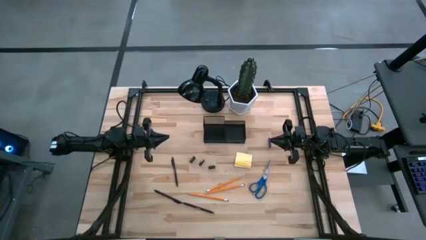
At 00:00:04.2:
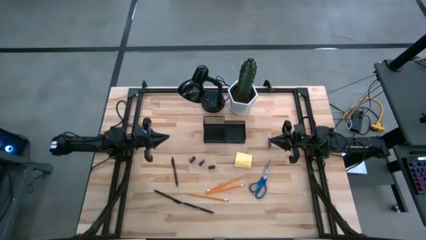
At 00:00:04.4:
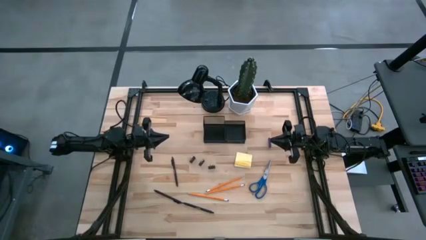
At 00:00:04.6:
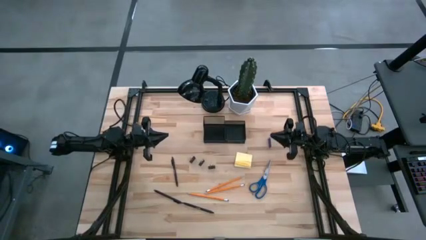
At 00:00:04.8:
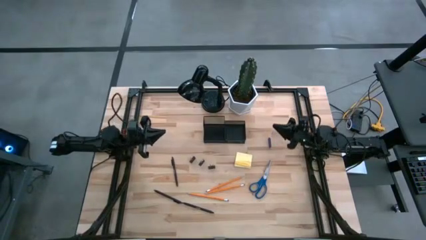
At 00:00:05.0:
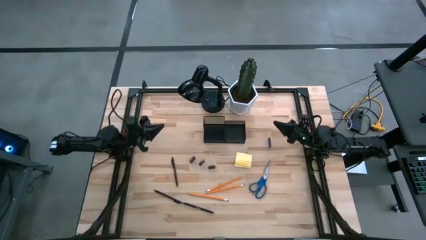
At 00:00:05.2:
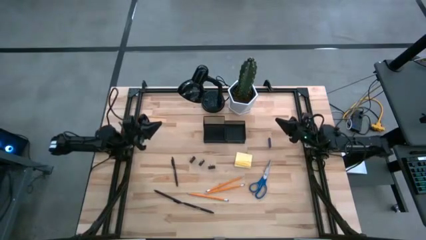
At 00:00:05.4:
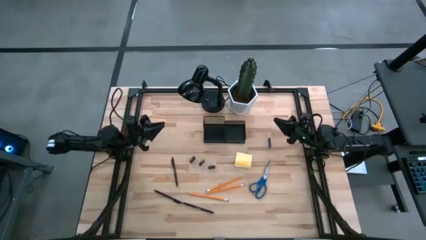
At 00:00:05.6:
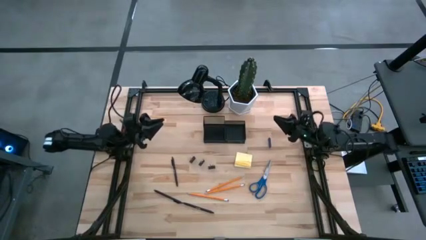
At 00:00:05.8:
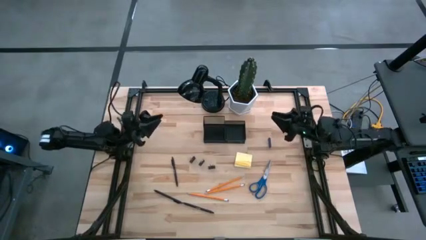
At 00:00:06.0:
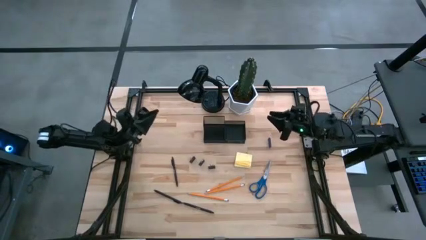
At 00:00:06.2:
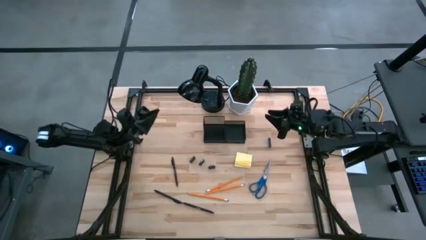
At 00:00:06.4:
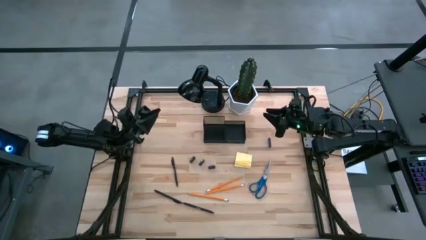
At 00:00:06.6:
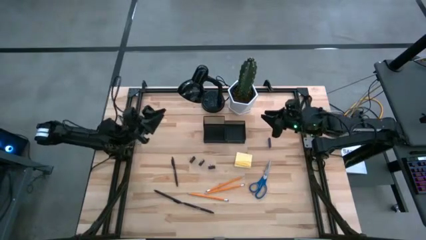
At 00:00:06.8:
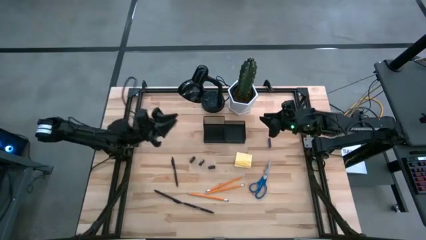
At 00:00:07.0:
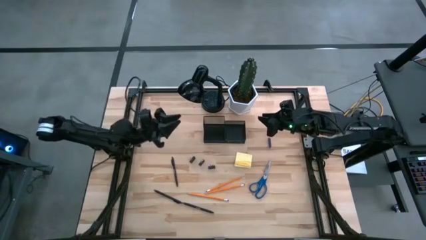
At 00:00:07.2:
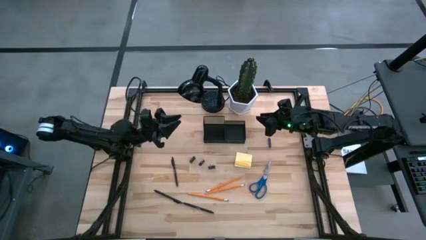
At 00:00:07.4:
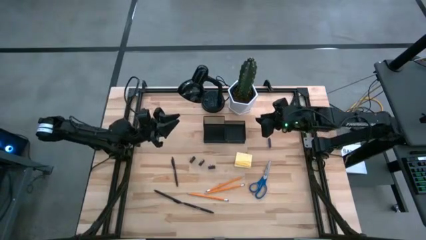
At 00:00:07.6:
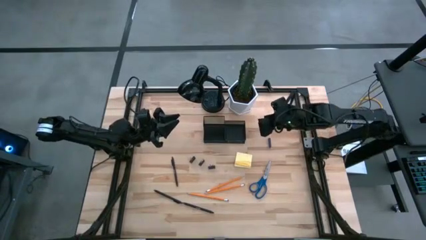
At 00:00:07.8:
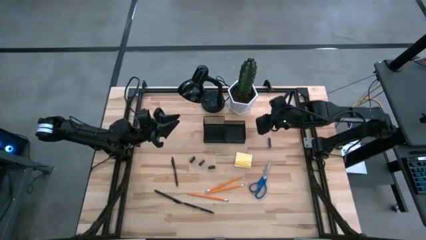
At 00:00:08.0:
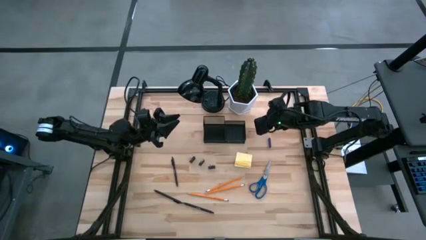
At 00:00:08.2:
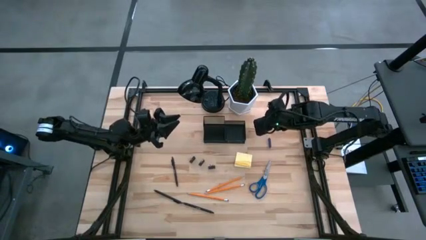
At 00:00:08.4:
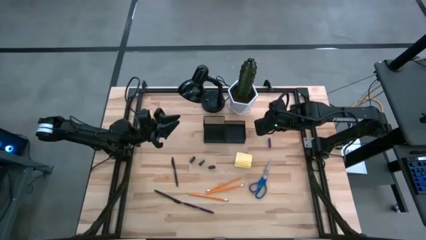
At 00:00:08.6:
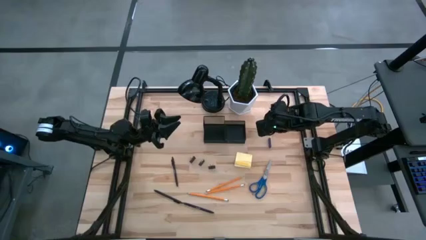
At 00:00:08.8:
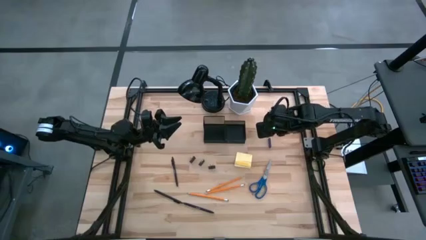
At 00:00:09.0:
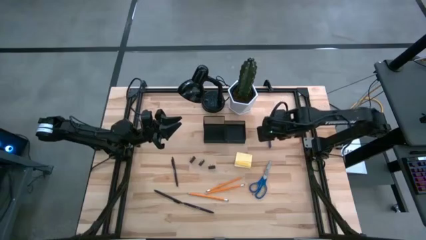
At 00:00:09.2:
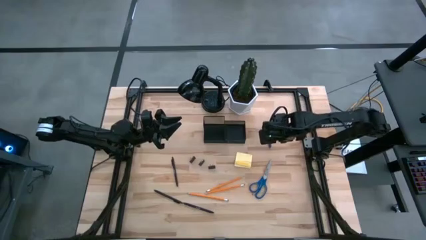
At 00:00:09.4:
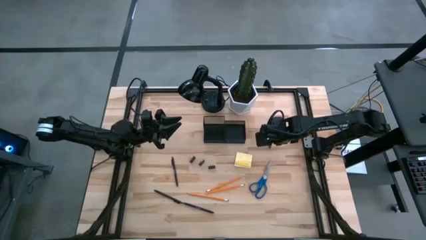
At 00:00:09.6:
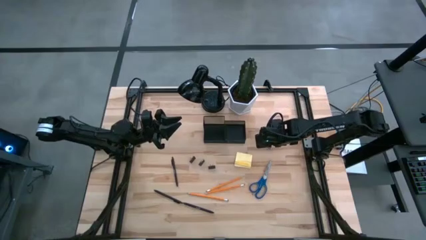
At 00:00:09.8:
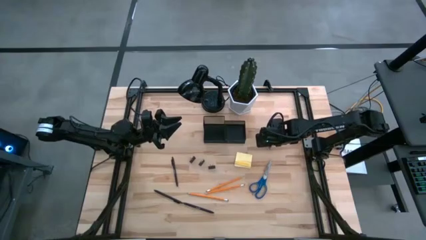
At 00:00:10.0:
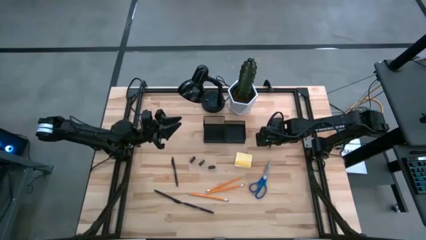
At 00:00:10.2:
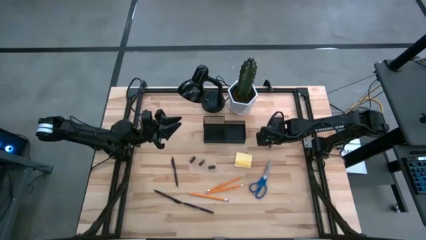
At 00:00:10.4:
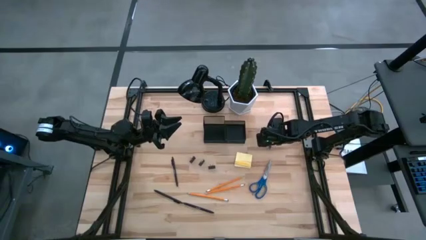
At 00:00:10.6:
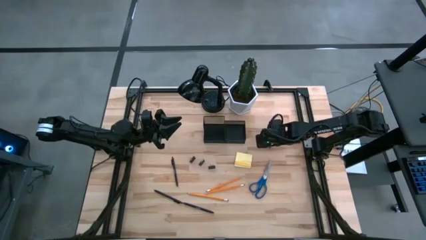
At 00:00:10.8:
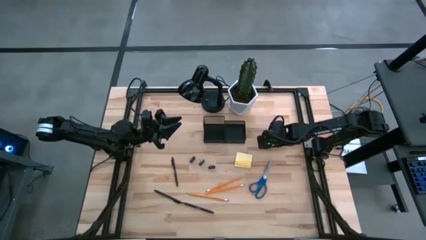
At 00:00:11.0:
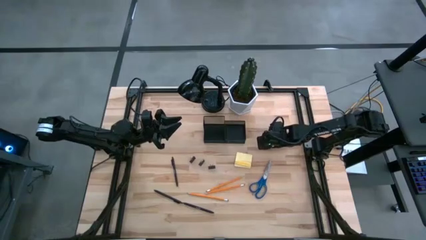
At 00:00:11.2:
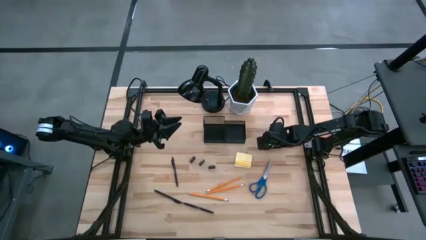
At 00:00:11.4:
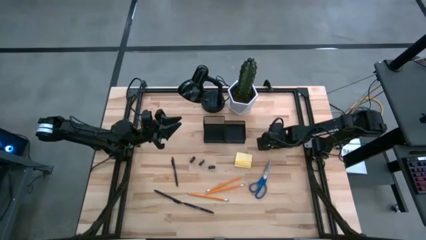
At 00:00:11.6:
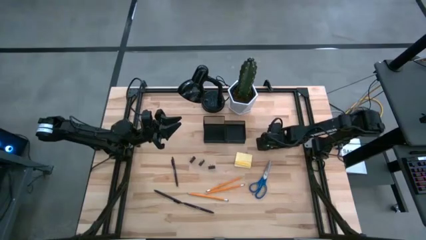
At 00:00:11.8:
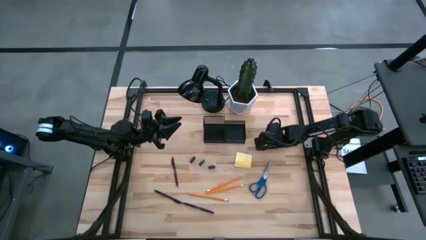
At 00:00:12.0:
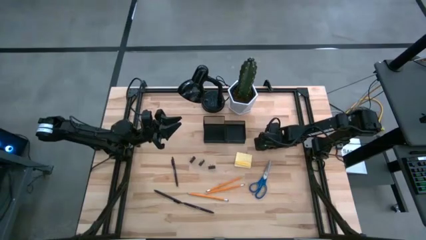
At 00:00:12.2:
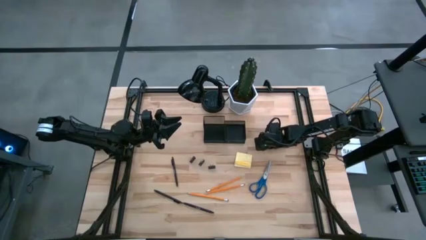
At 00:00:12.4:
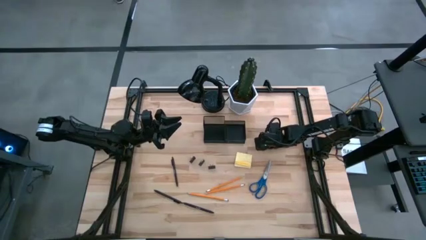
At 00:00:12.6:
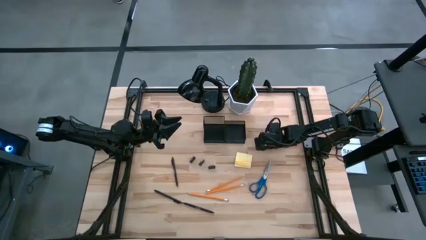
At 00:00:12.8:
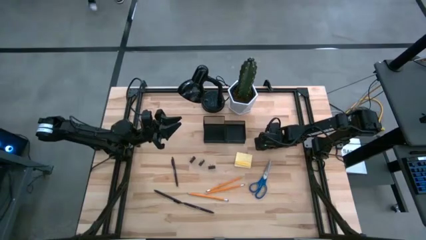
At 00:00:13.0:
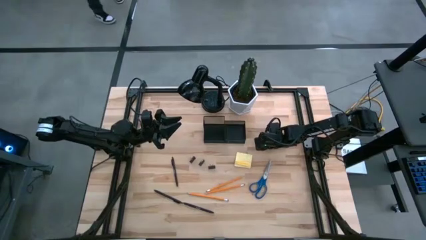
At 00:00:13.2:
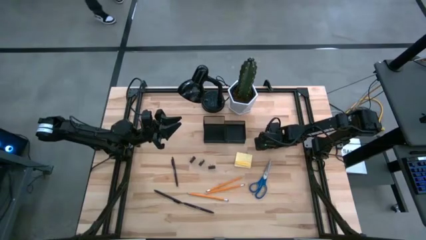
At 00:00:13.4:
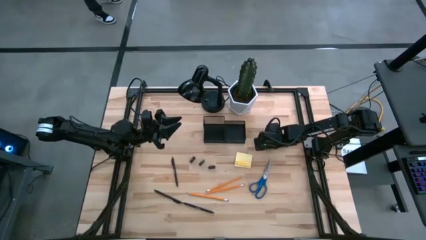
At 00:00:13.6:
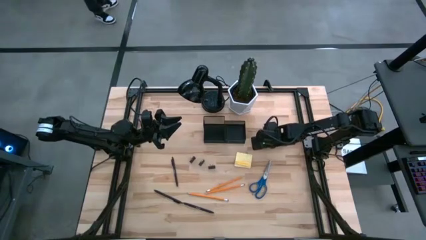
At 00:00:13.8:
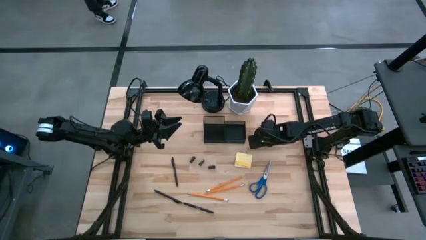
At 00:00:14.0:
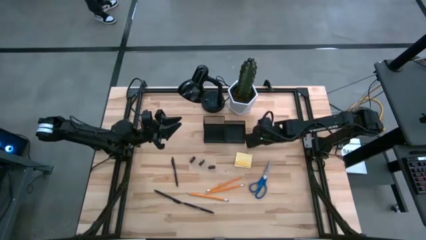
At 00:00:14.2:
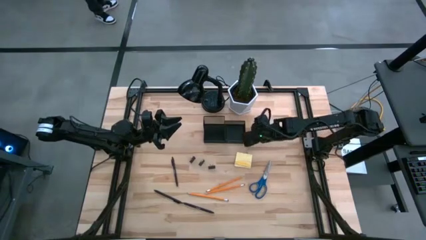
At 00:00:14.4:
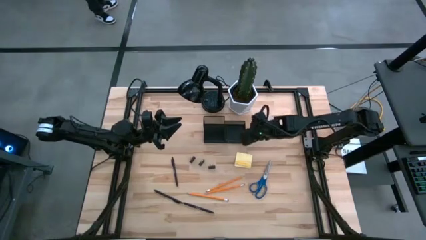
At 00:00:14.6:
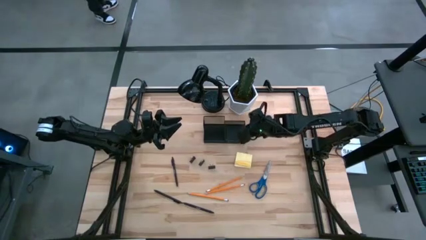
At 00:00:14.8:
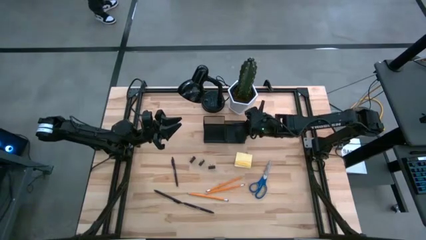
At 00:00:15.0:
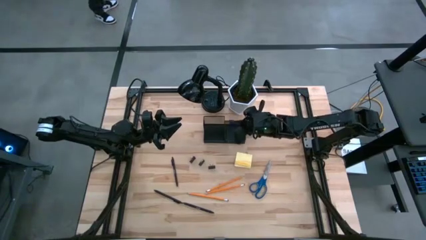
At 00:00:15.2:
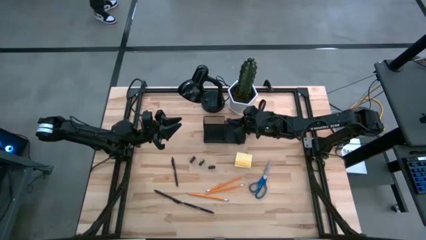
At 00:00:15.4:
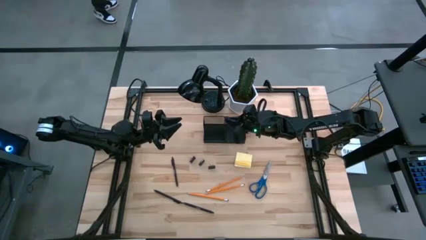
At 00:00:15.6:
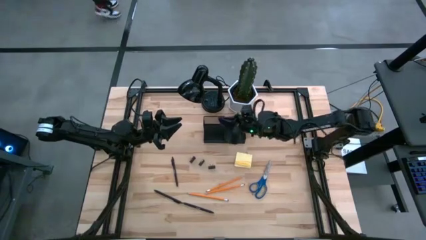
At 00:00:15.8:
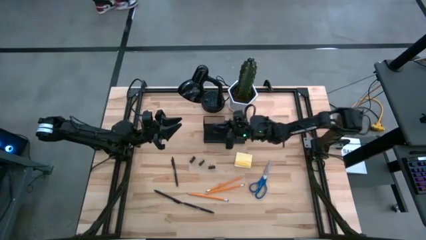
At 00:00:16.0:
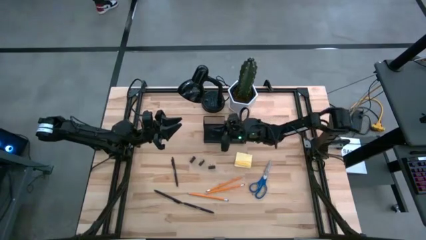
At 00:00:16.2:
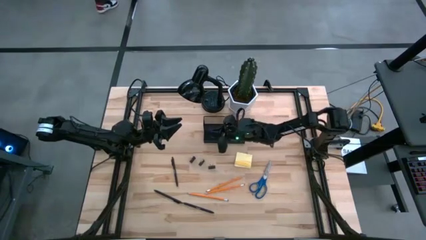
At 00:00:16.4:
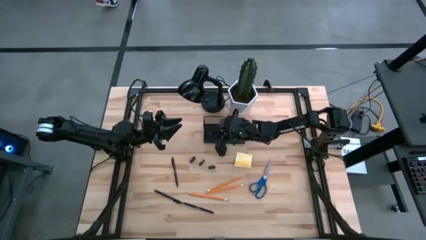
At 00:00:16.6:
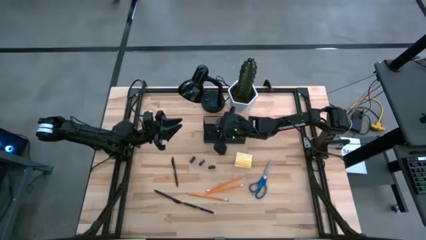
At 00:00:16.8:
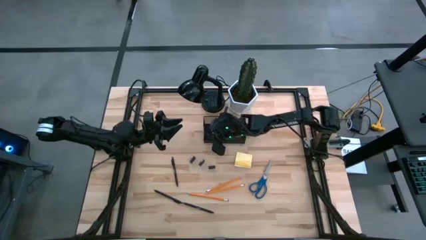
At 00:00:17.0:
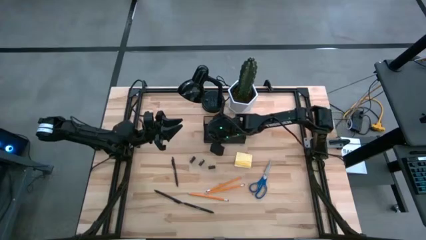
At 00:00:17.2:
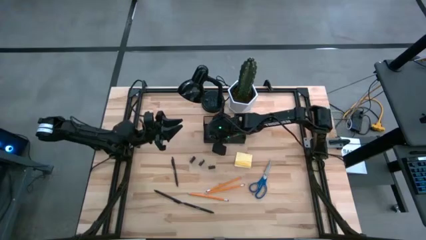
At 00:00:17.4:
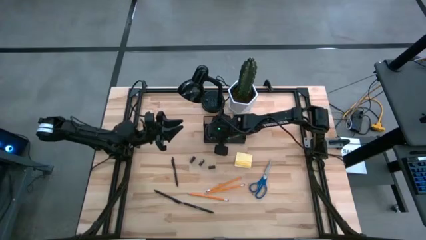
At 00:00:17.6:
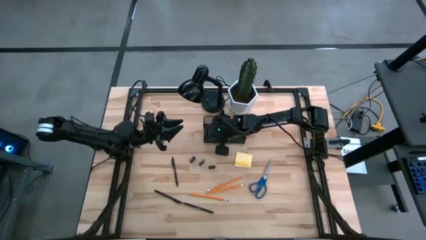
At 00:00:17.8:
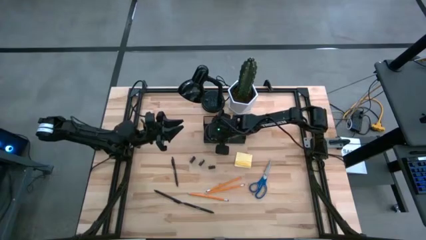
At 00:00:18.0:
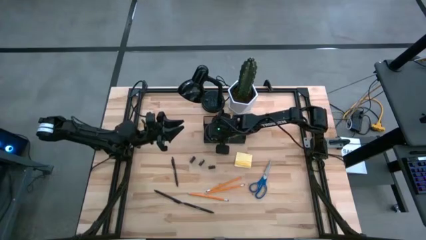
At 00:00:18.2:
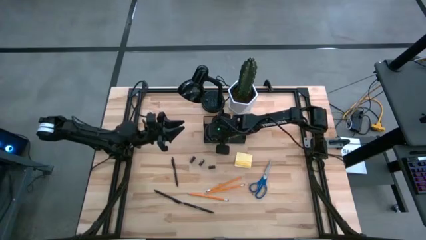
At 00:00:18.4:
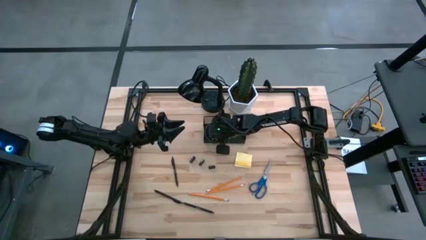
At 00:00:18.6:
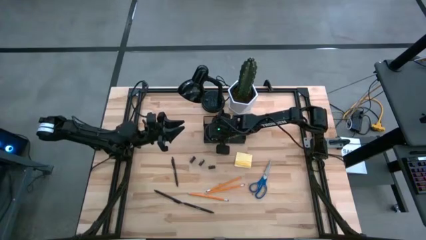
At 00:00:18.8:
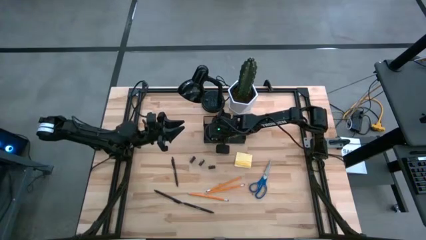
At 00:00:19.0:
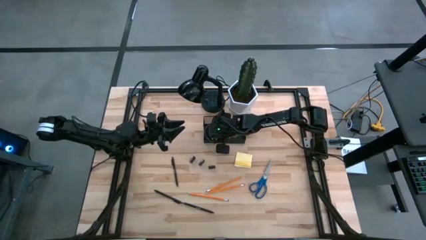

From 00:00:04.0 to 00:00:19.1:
Task: Pick and place office supplies into organizer
Put the blue eraser into the black desk organizer
